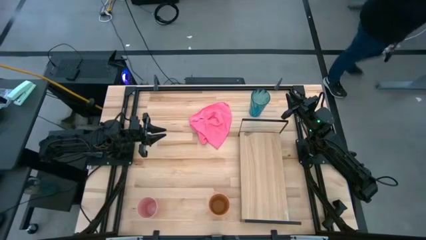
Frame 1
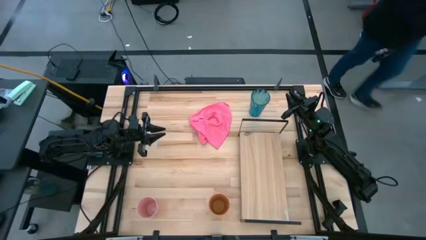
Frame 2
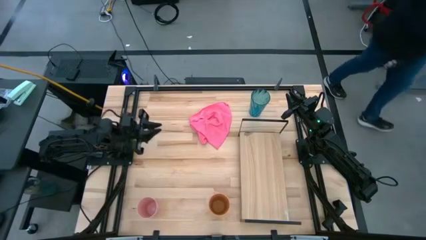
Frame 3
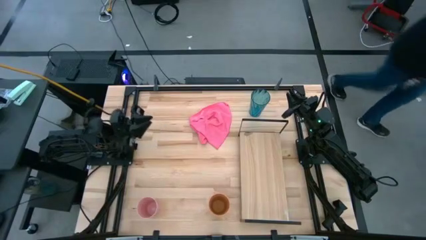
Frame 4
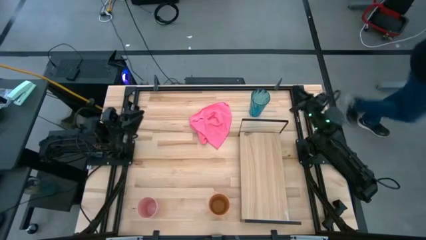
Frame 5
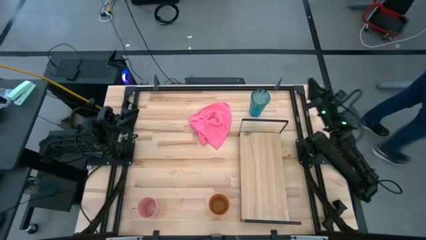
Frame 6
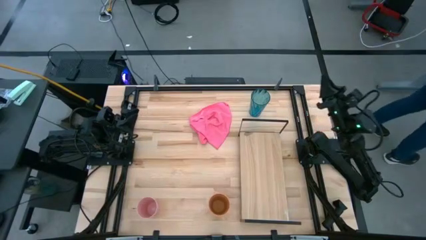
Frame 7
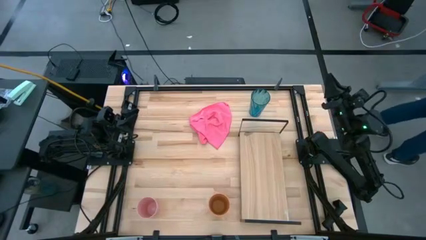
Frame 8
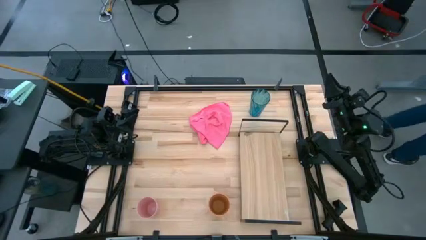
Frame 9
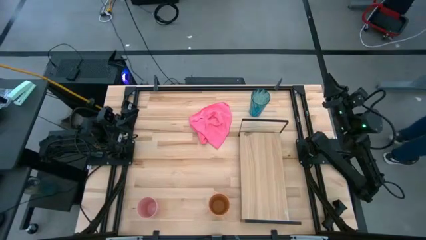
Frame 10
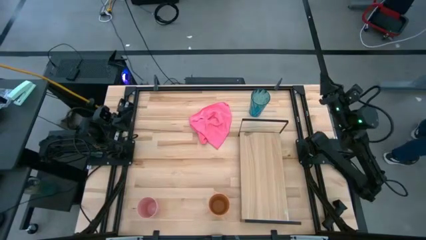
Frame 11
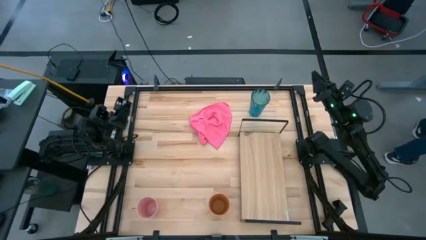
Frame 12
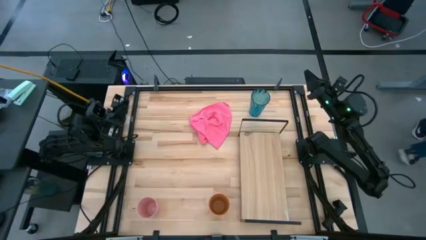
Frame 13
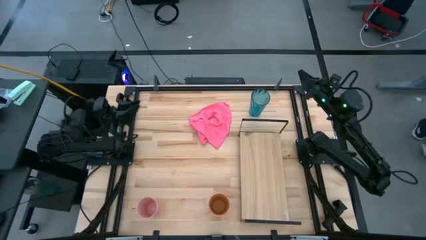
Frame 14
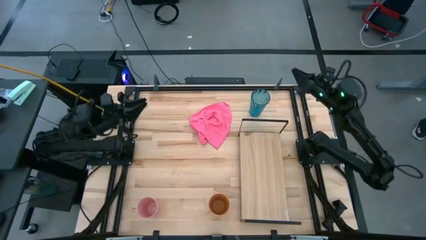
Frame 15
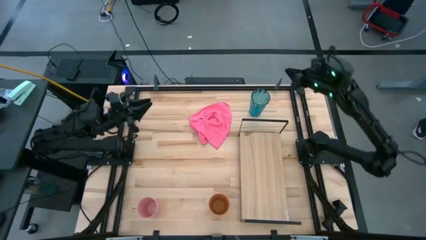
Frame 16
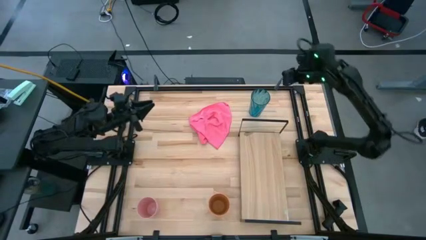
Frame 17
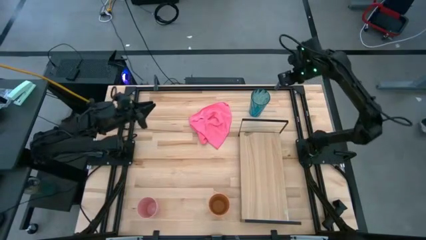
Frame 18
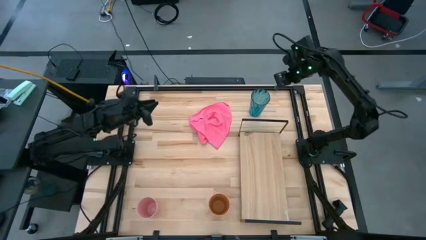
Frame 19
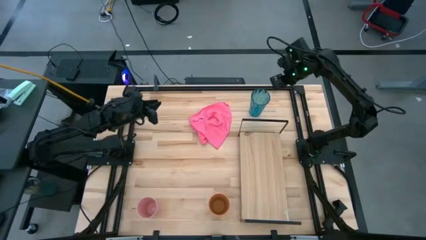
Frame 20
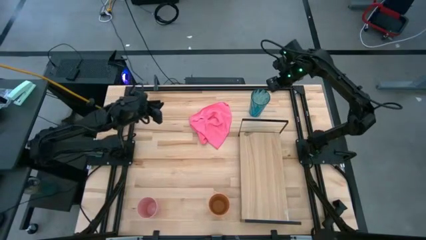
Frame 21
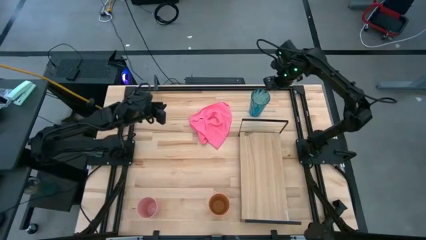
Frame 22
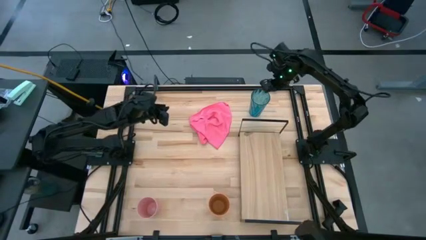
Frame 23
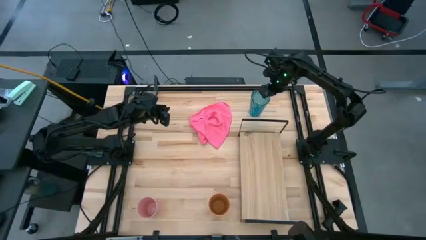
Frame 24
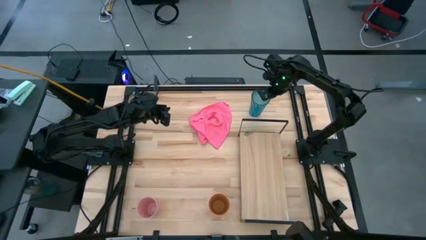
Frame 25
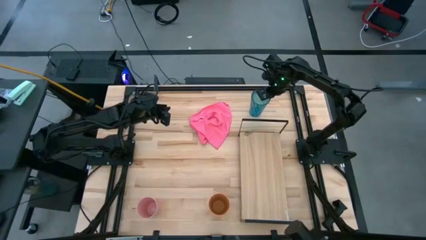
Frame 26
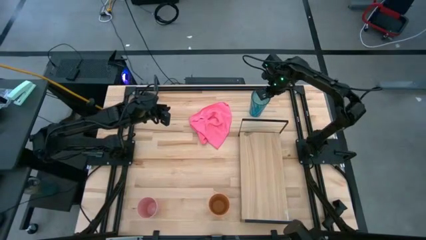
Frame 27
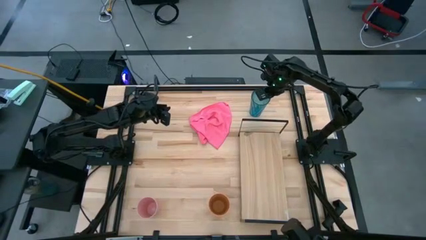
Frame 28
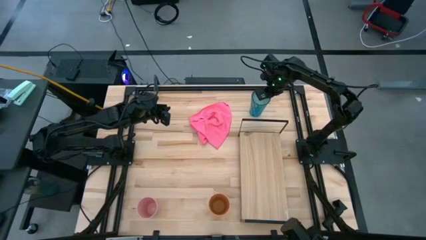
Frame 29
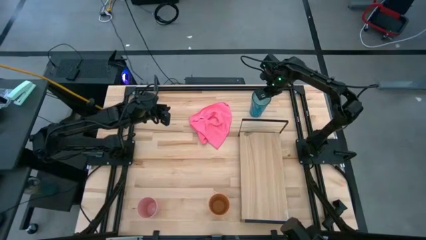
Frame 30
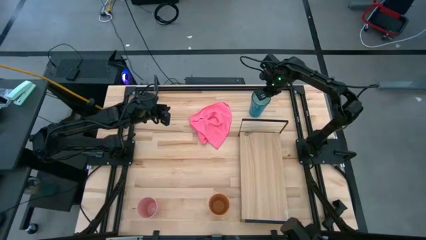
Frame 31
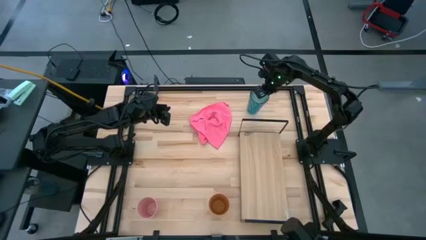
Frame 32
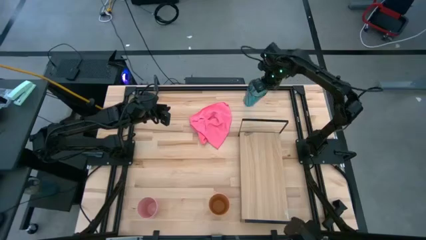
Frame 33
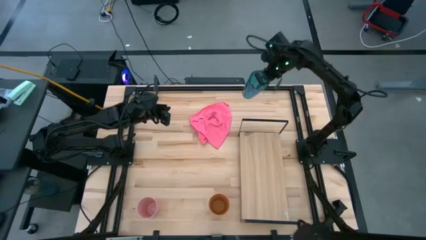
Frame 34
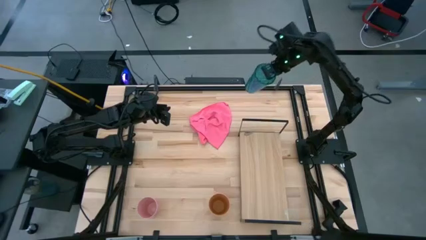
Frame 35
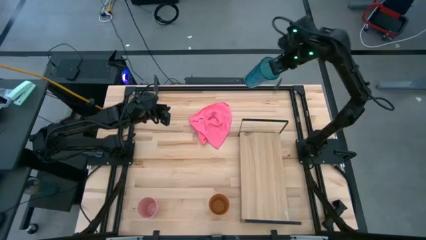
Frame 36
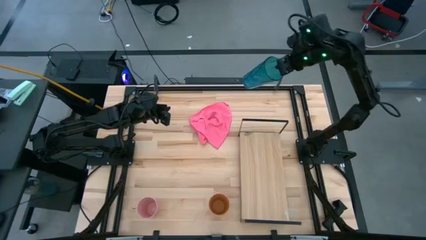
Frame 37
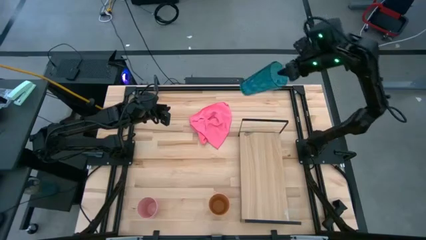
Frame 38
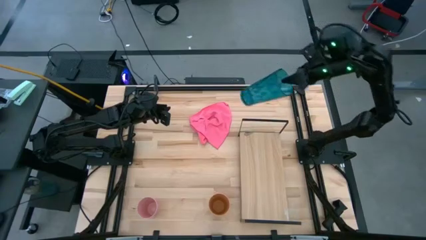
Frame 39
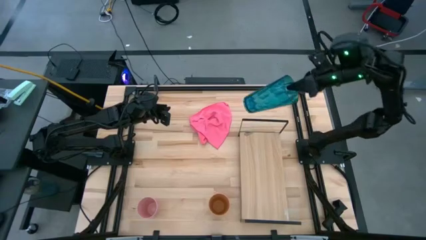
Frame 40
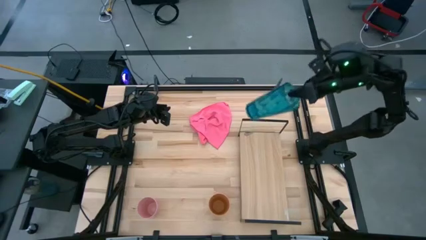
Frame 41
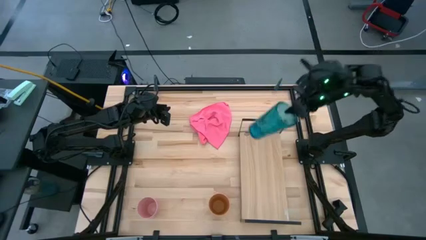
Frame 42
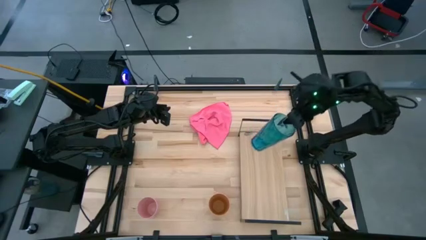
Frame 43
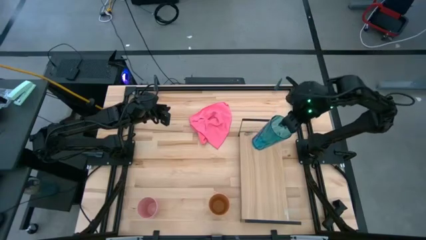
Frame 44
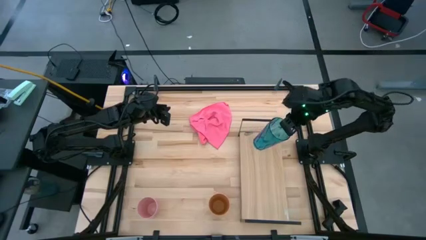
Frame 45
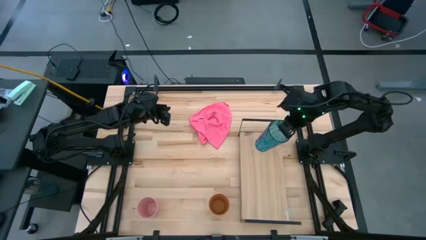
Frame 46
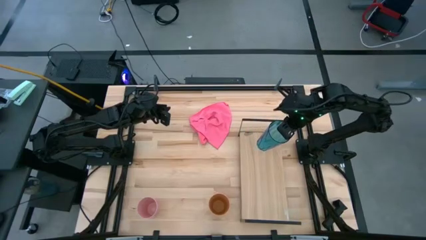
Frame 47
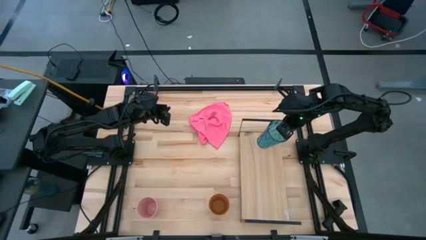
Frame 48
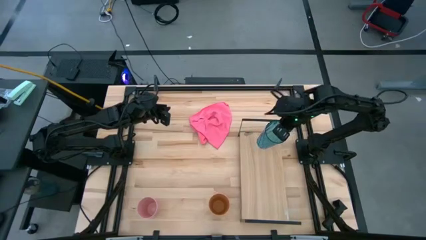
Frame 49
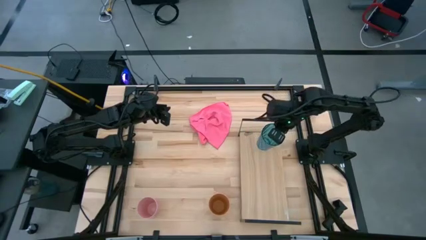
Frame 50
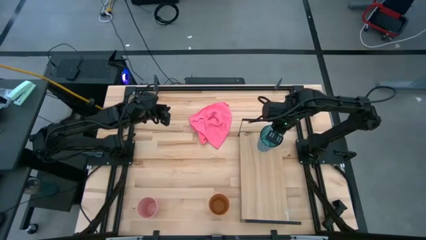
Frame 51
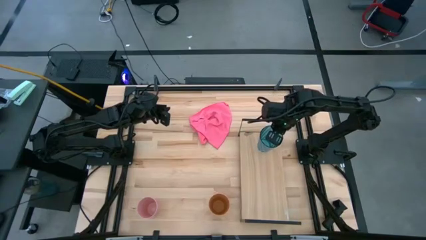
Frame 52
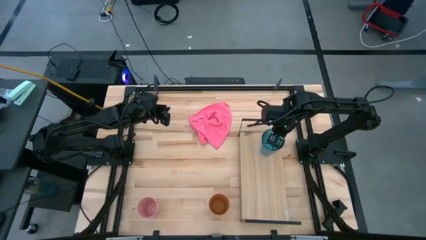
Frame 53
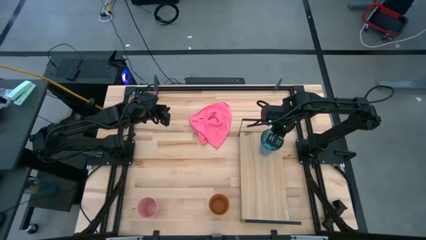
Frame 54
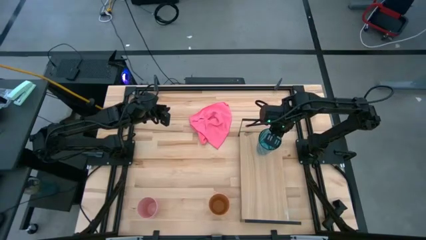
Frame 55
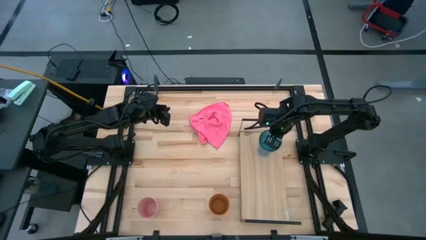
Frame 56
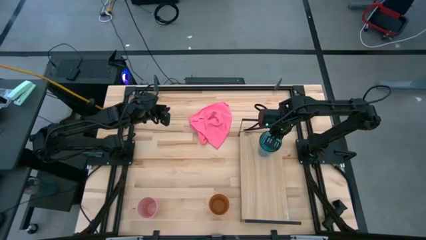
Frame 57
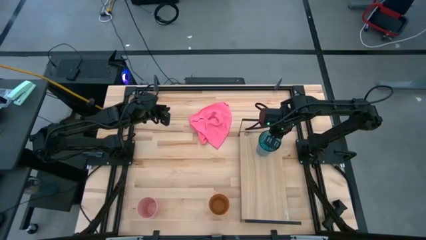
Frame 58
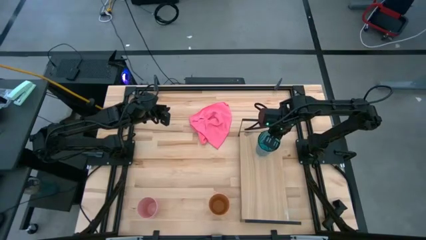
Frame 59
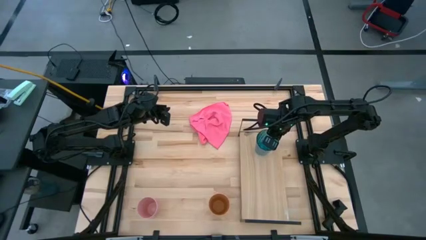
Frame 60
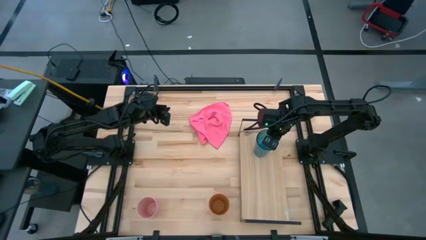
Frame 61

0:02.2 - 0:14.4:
Task: Stack small to large cups/mugs on shelf
Put the blue cup on the shelf
